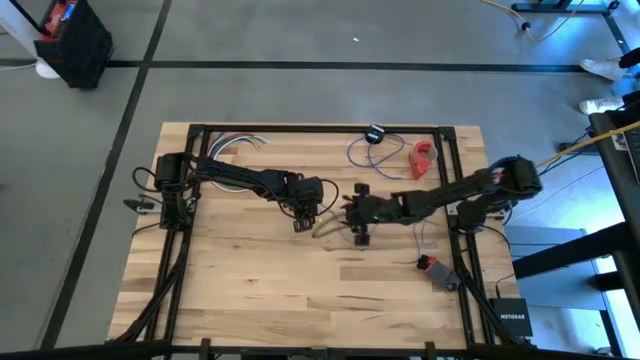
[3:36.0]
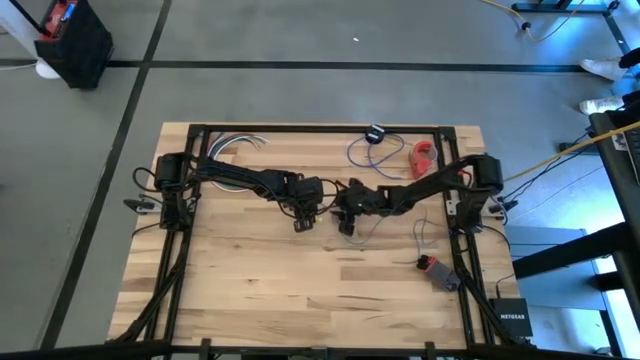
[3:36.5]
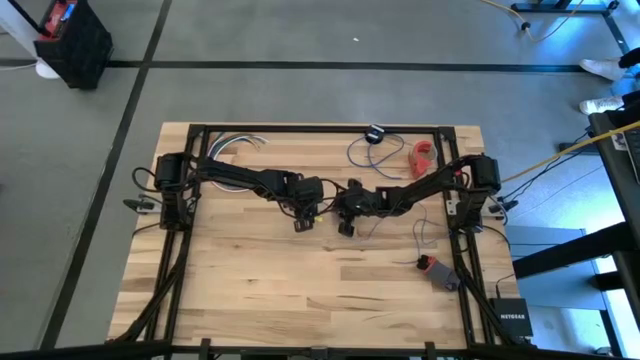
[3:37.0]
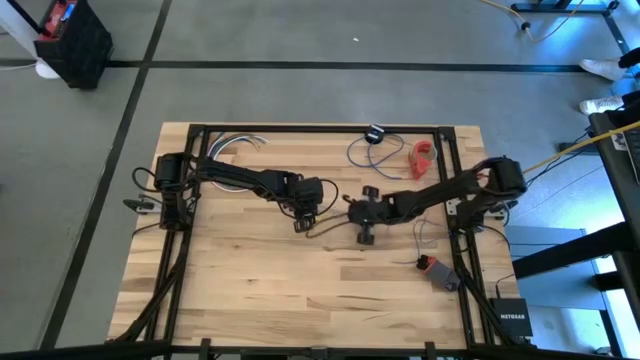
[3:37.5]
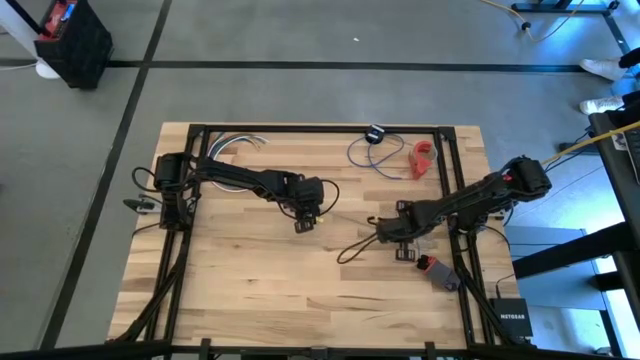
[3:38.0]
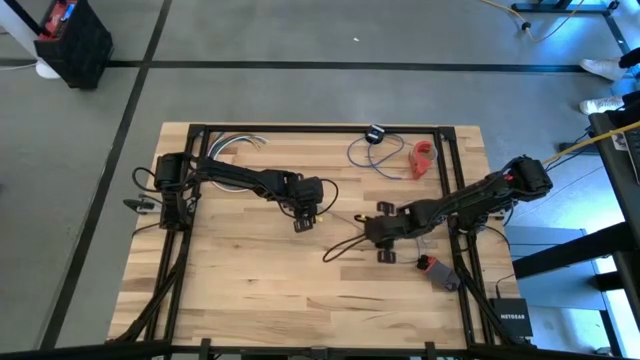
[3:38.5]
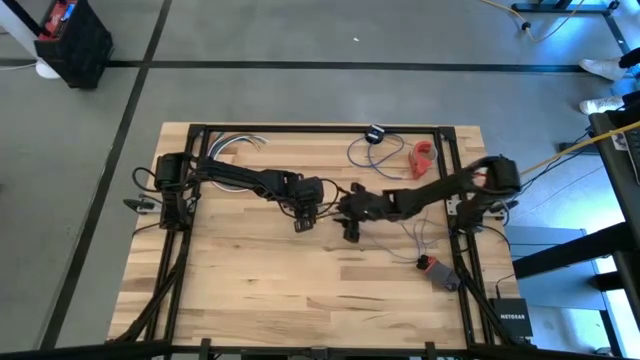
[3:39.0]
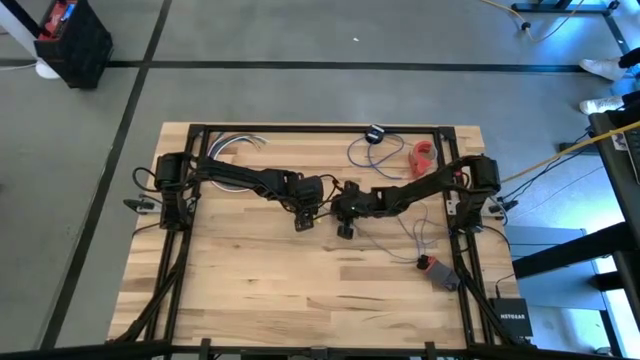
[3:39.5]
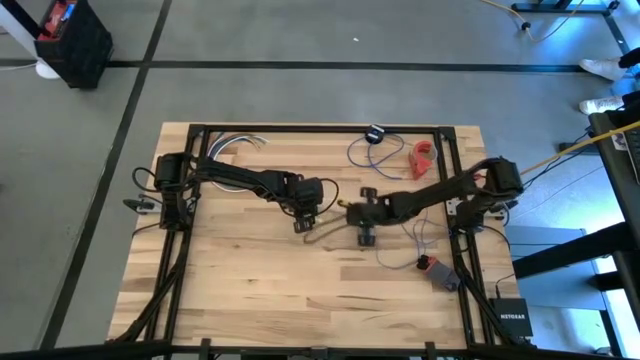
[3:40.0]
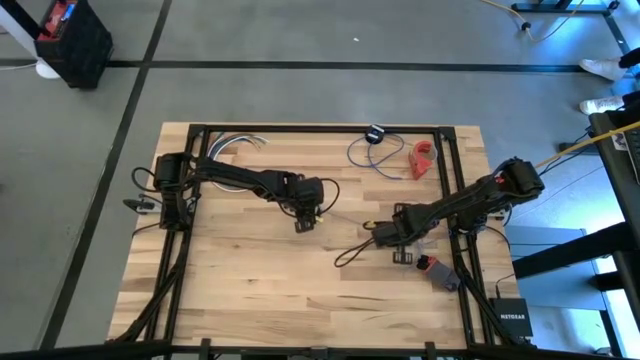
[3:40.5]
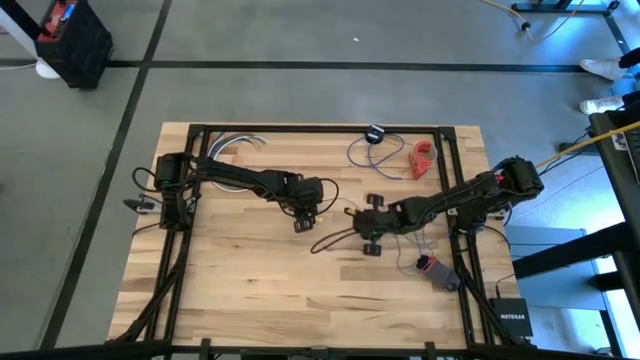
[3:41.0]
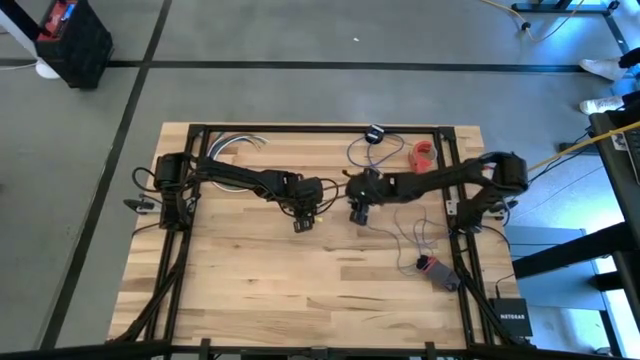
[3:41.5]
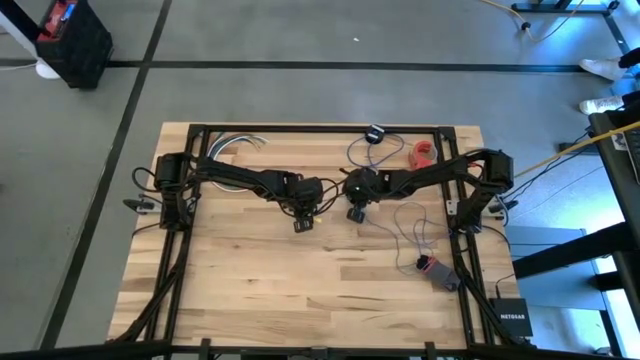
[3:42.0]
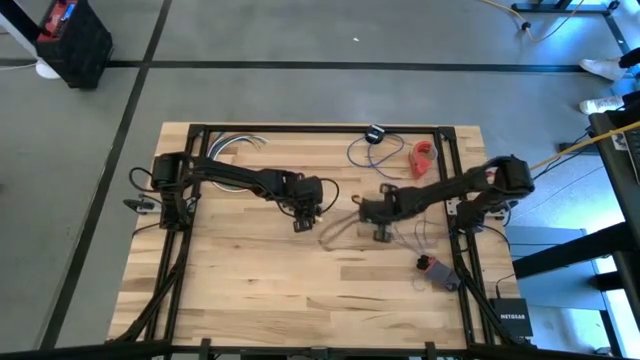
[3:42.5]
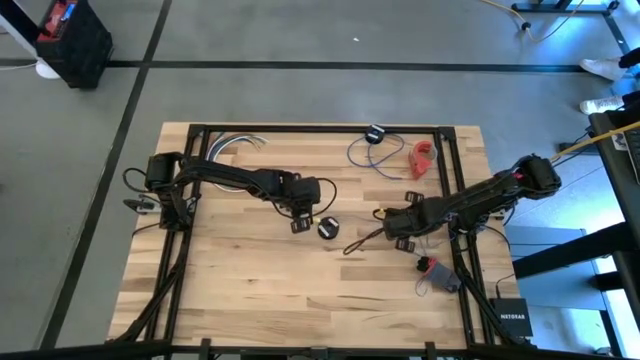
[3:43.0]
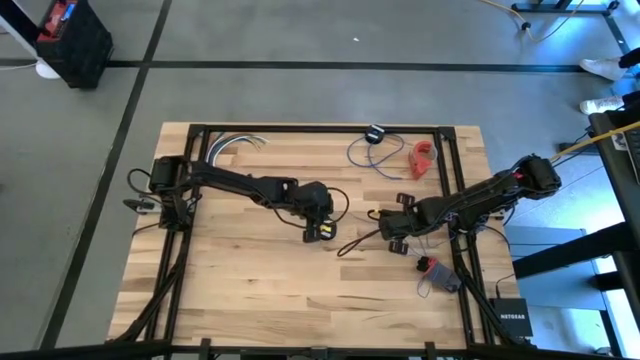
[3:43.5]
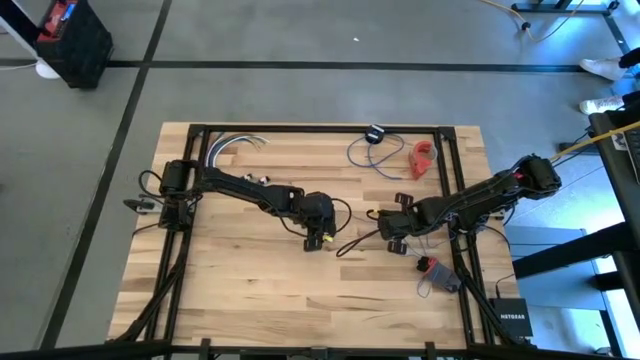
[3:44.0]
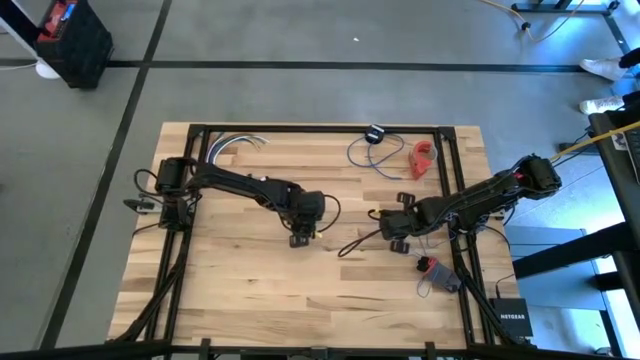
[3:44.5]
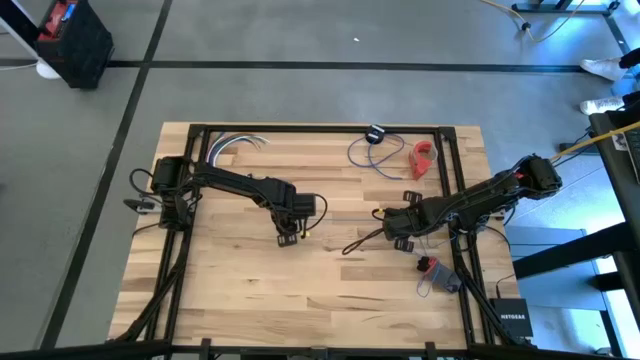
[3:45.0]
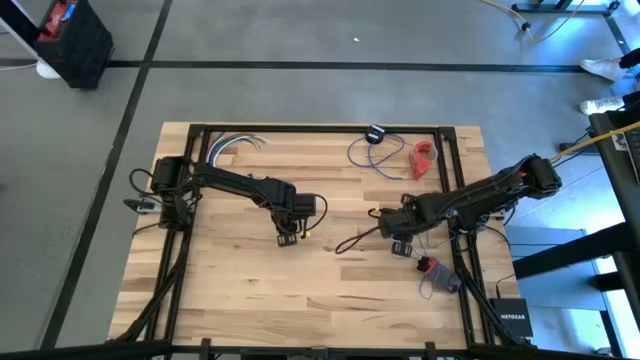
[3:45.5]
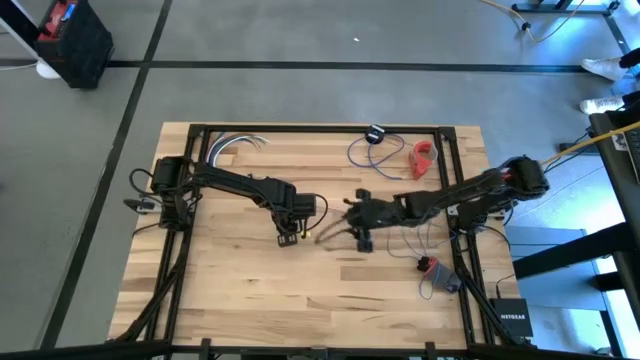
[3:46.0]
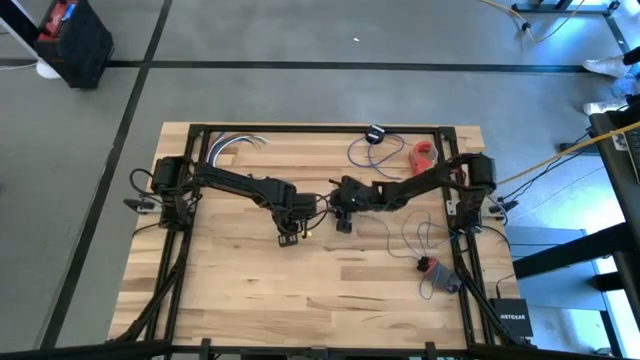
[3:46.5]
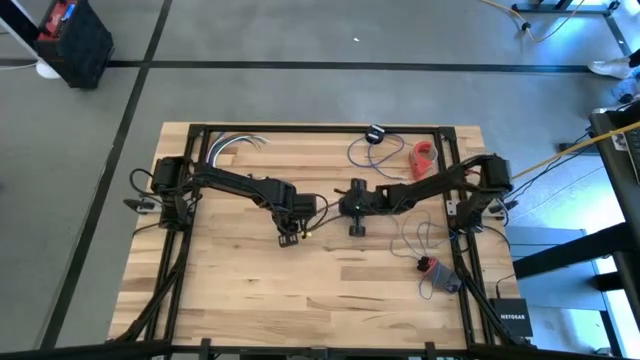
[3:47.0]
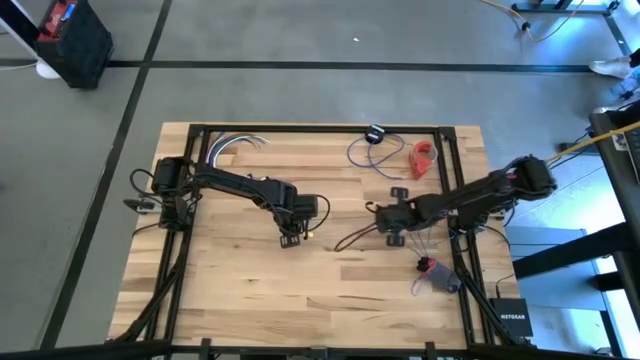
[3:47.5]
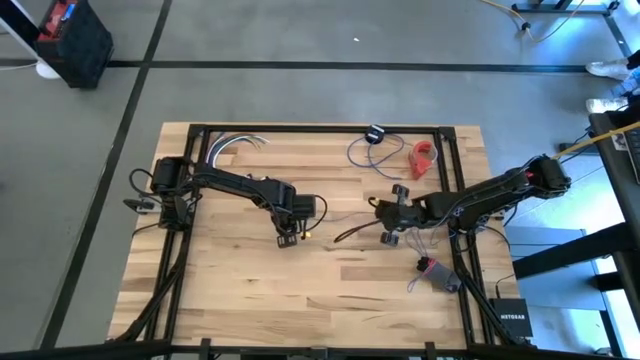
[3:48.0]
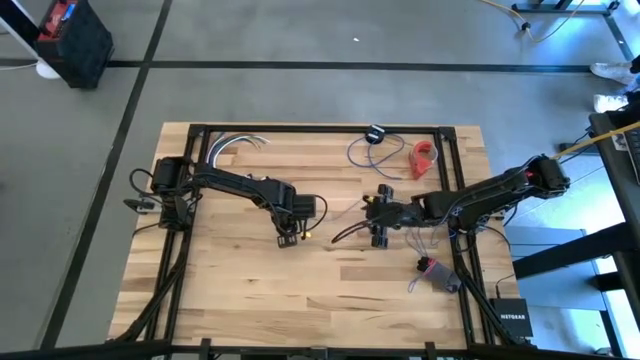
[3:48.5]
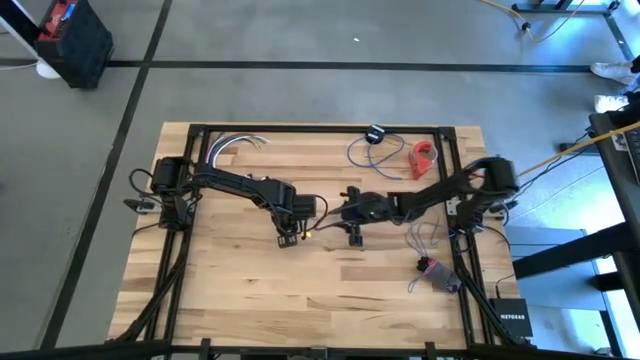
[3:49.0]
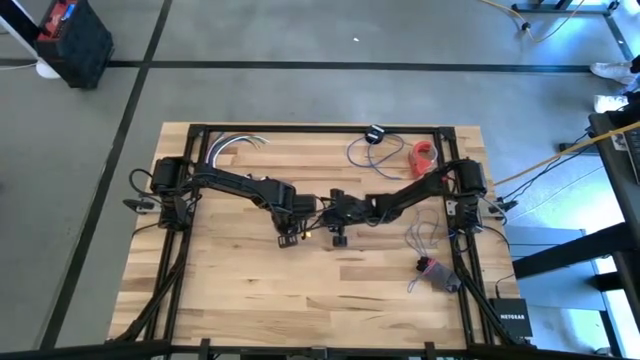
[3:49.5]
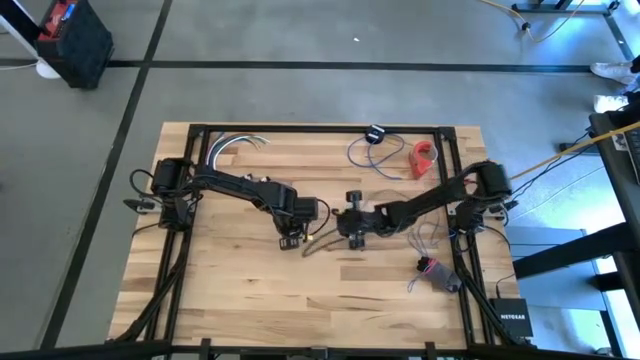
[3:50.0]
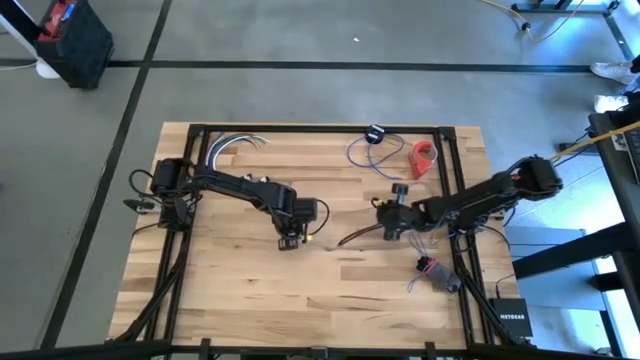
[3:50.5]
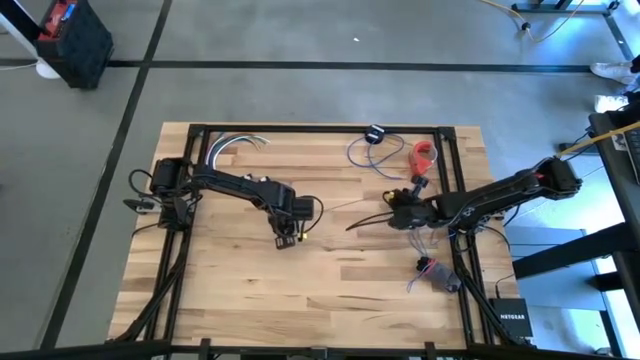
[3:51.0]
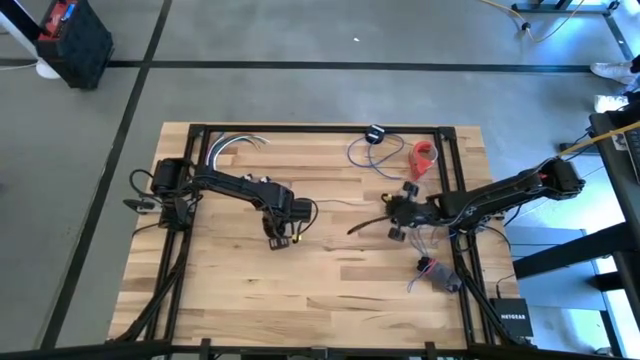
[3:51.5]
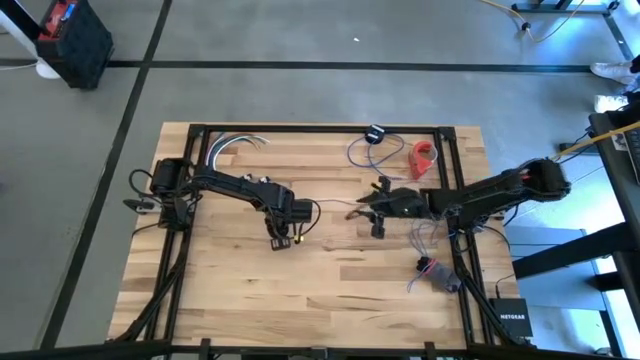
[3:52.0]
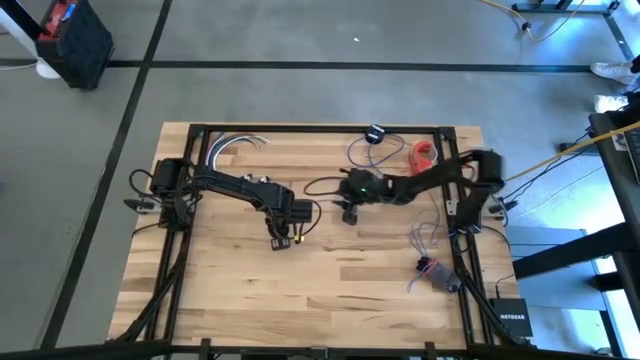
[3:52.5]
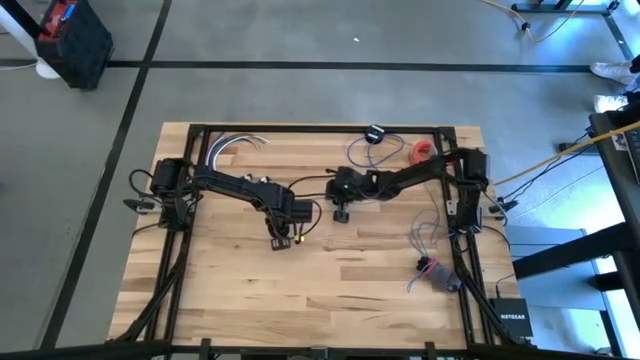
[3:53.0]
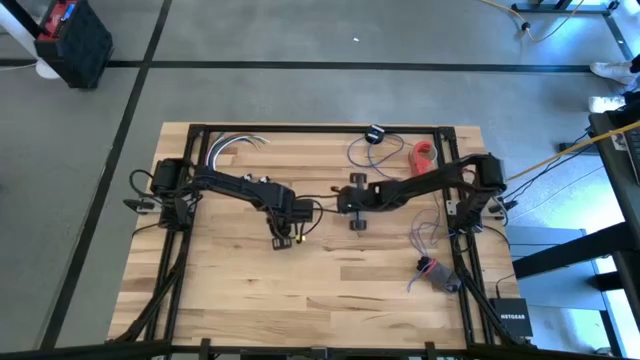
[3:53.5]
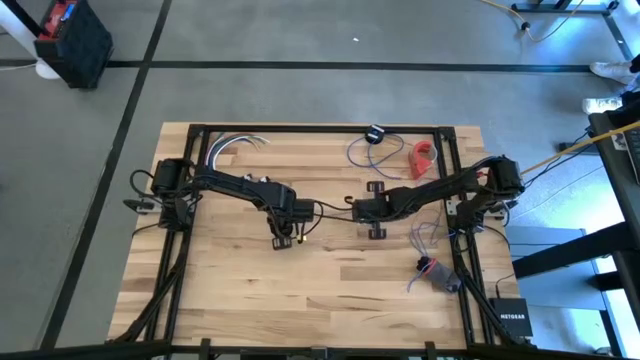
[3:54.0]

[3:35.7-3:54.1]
Task: Coil cords
Uncoil the blue wire from the spool

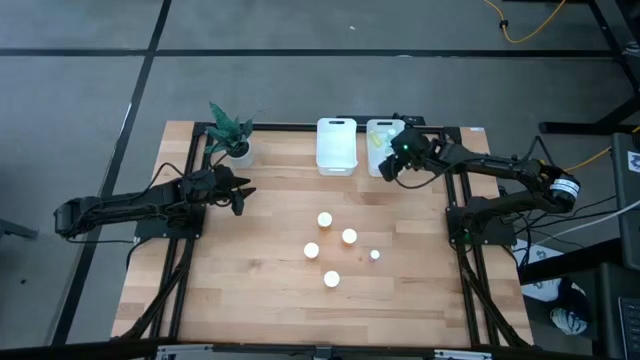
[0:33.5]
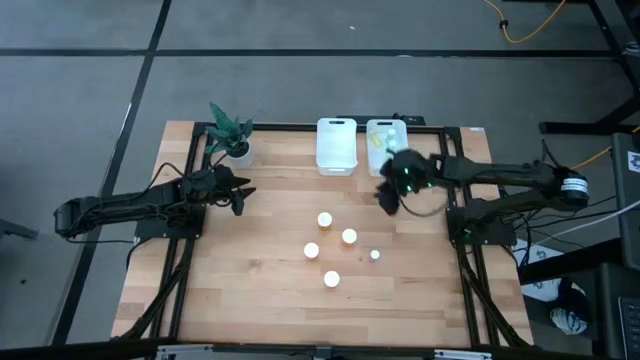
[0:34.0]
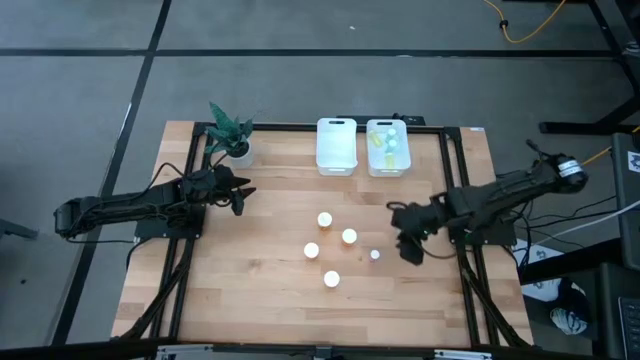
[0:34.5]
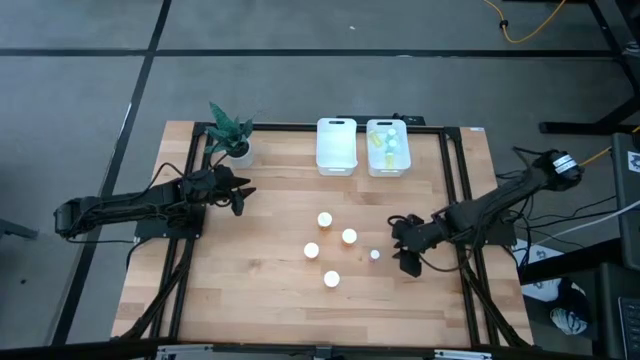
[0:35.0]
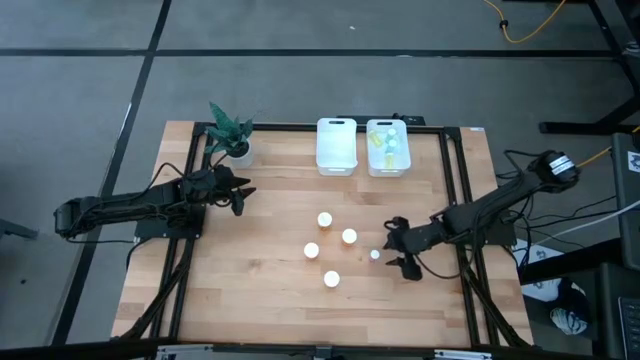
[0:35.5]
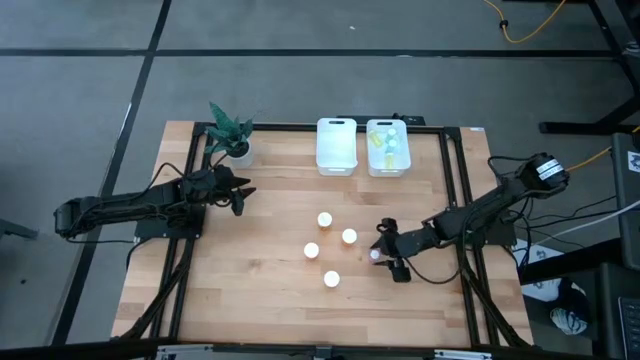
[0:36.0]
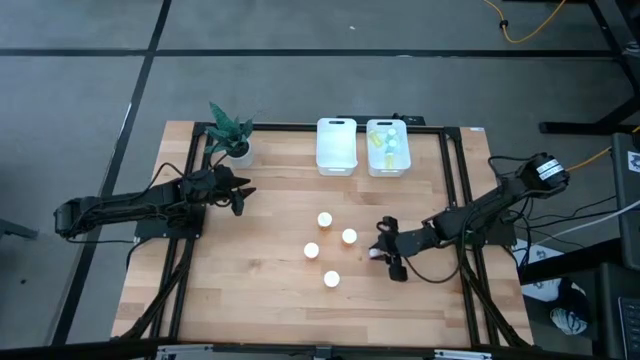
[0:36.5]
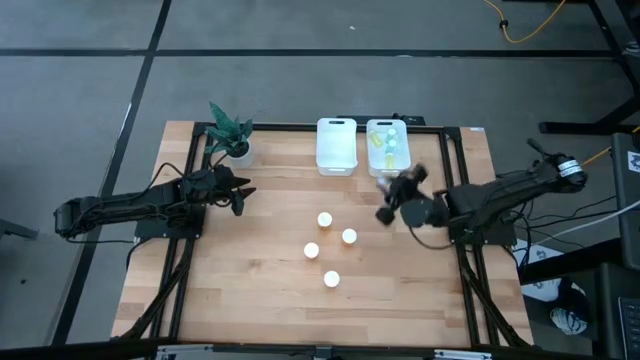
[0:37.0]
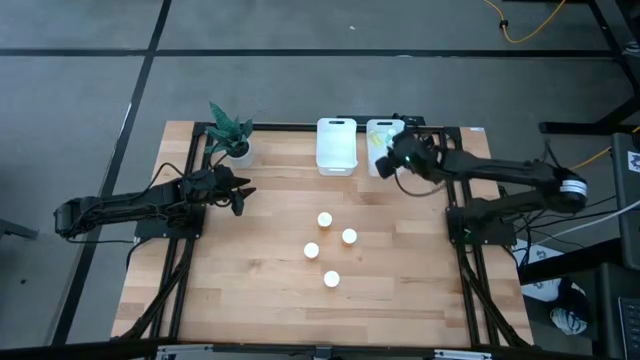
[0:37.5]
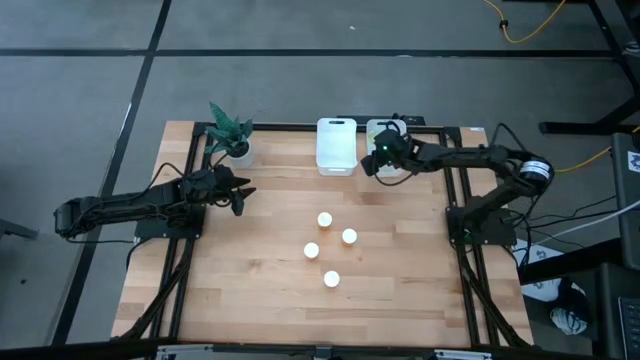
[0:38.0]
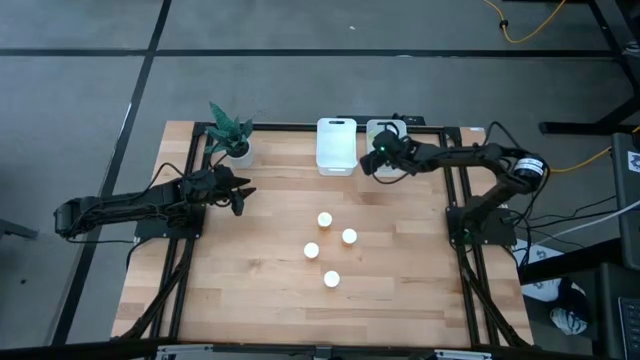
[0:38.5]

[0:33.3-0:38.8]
Task: Pick and place medicine bottles into bin by pill shape (circle, oval)
Put the small pink pill bottle into the right white bin
